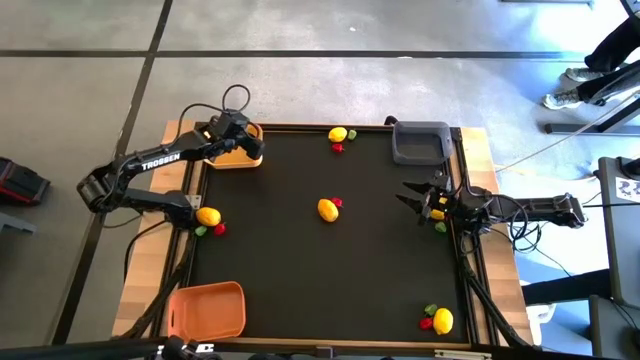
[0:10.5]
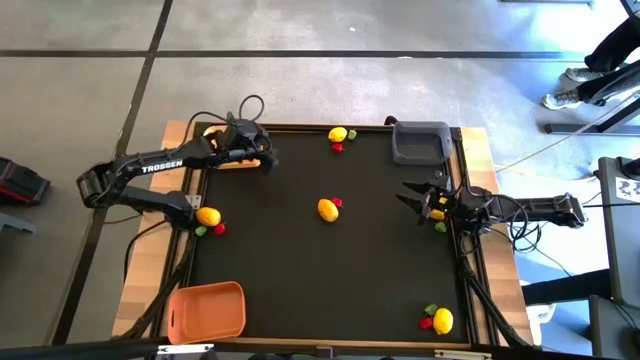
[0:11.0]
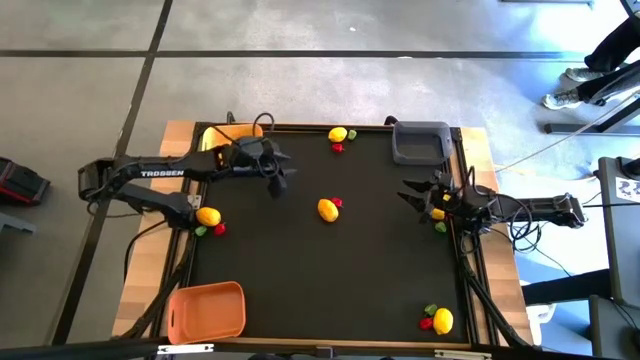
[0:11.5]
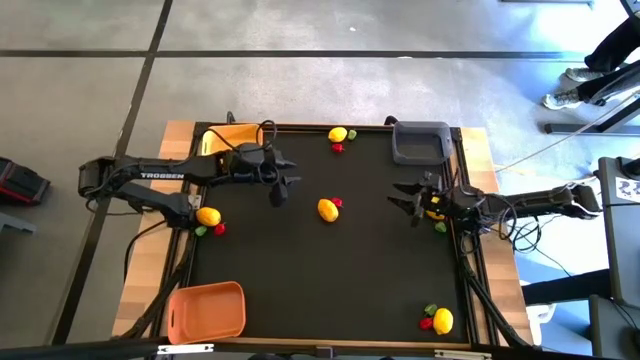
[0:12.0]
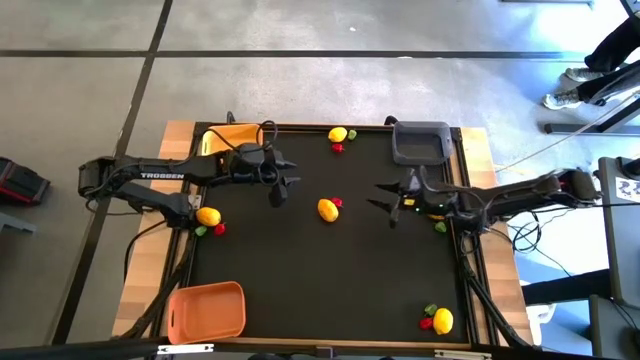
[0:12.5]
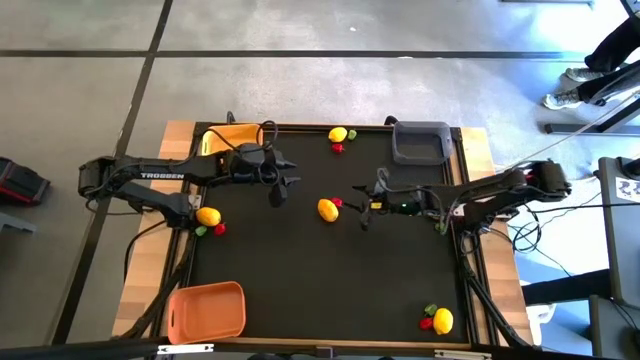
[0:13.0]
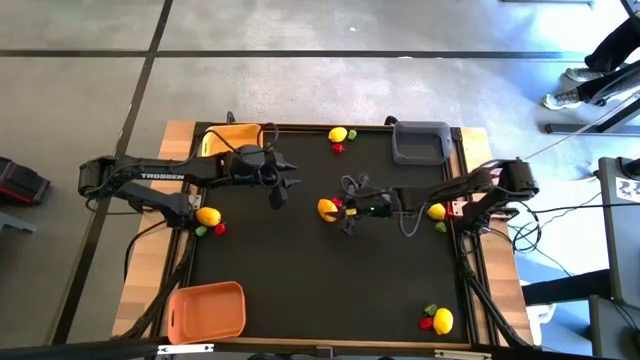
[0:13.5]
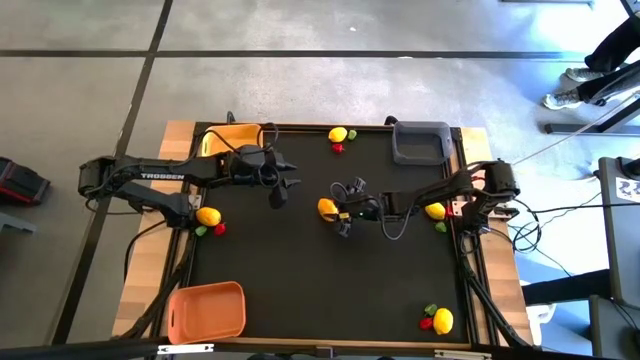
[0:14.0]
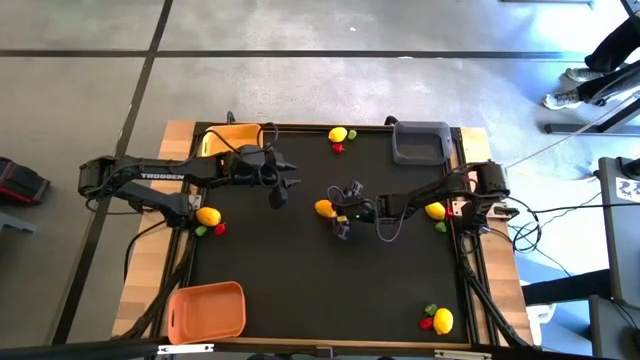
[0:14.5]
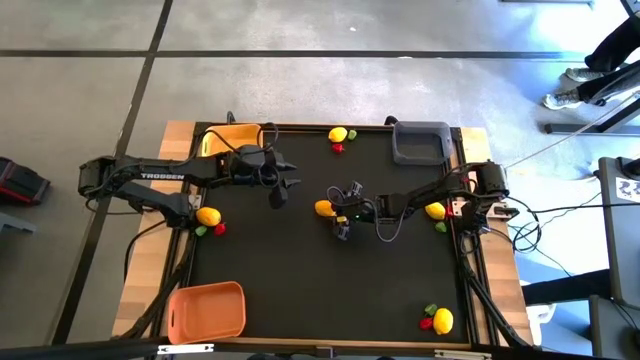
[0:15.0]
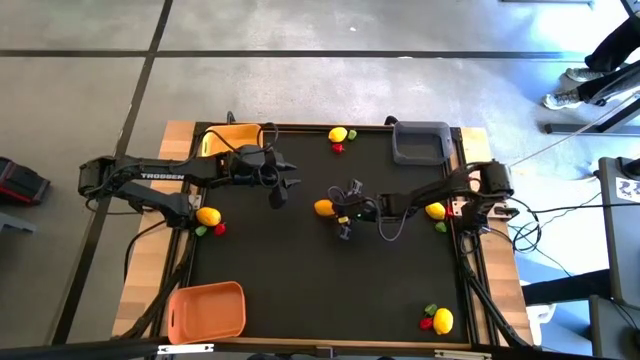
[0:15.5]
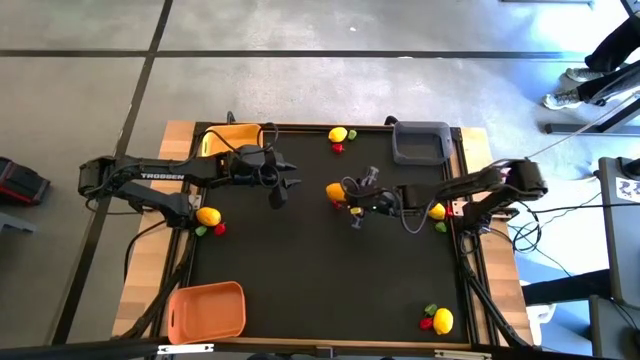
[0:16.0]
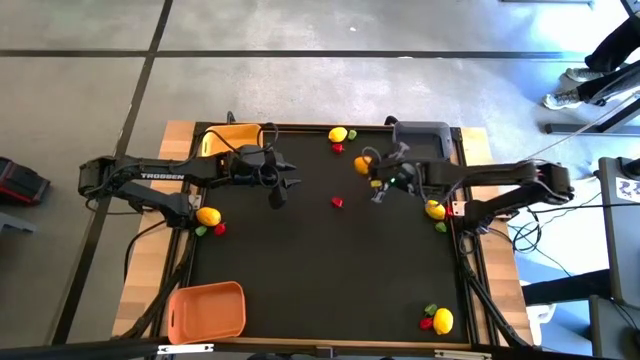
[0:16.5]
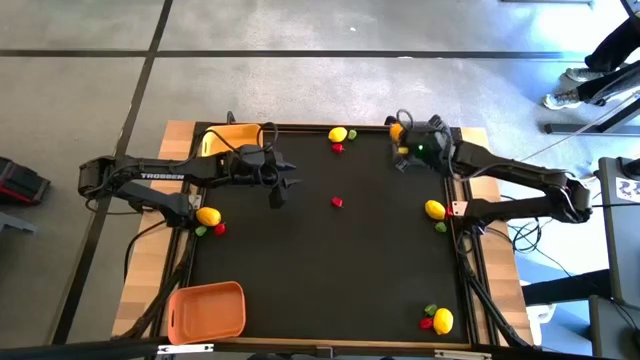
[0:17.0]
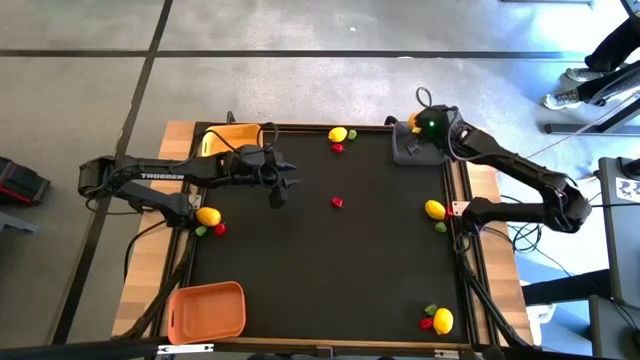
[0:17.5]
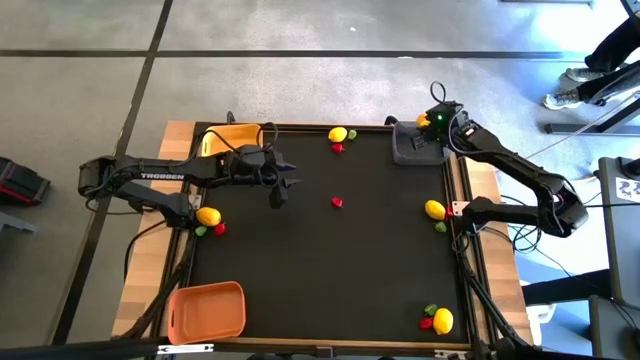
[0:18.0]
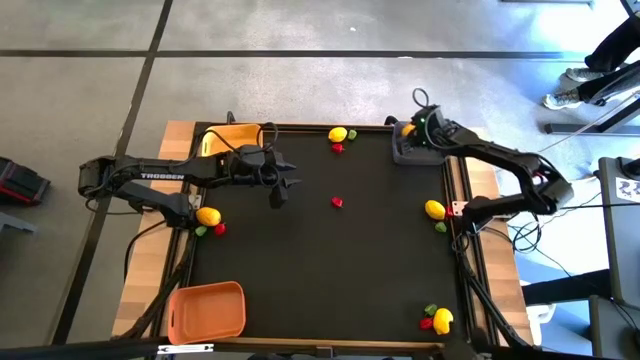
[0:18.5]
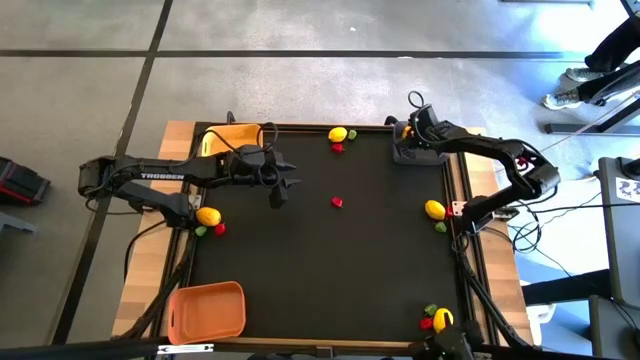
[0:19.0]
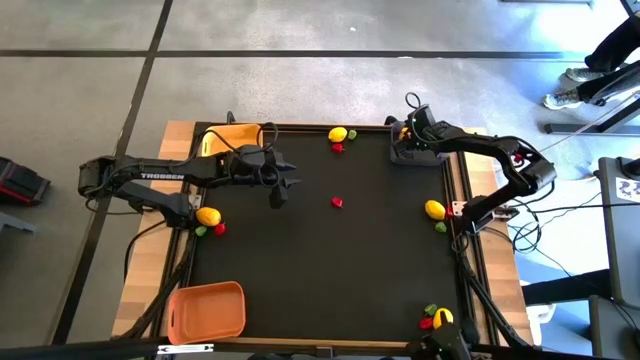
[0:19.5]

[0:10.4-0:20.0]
Task: Sort produce into baskets
Put the yellow lemon into the black bin

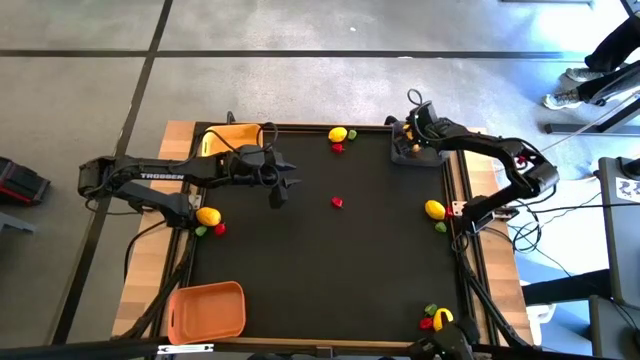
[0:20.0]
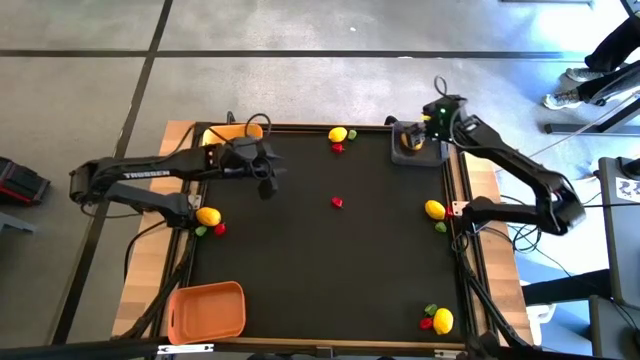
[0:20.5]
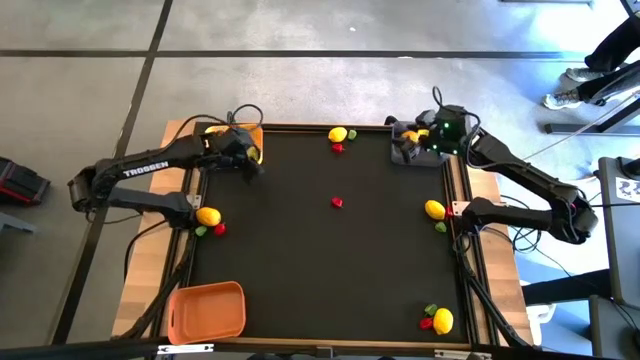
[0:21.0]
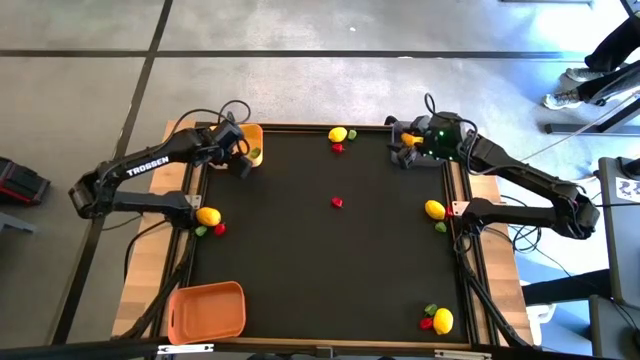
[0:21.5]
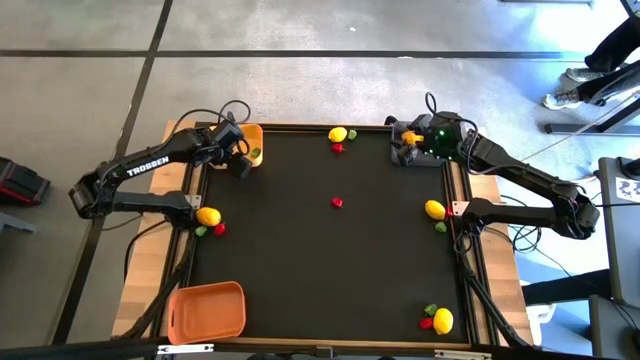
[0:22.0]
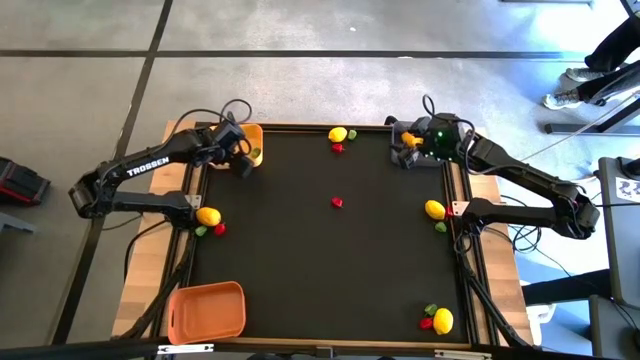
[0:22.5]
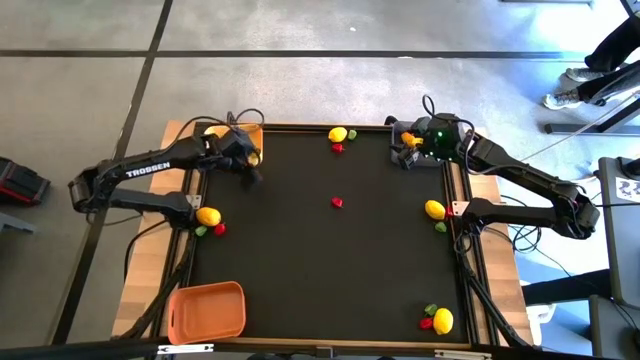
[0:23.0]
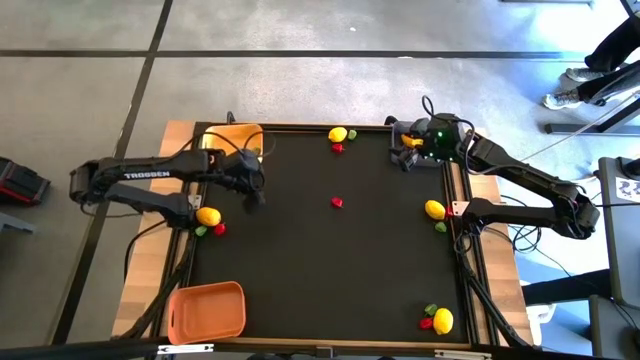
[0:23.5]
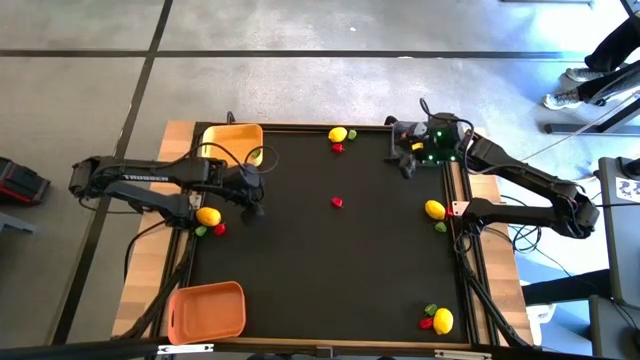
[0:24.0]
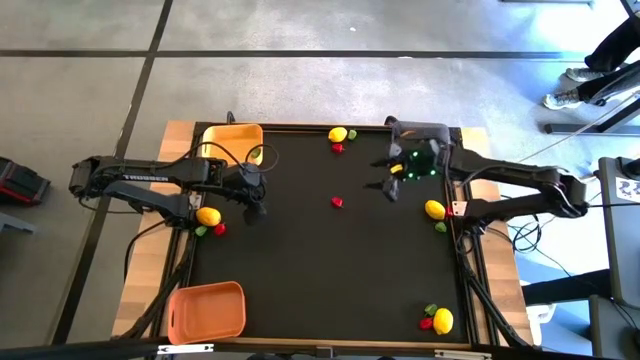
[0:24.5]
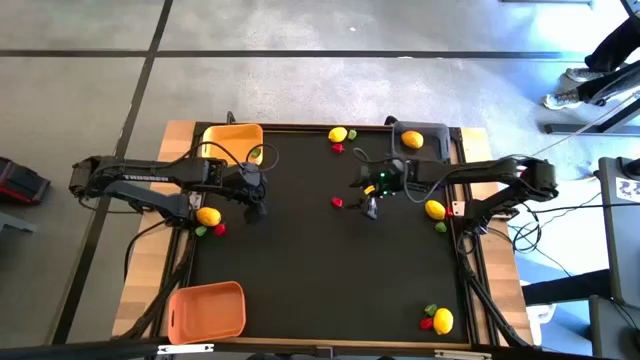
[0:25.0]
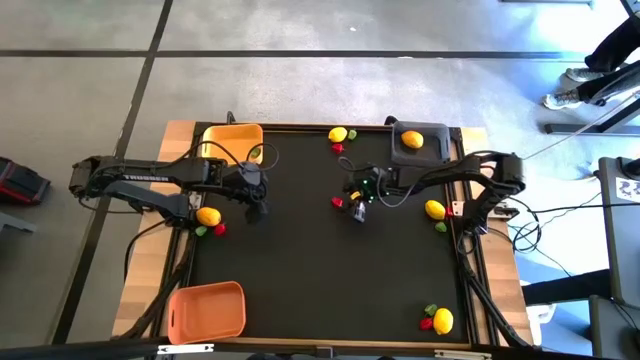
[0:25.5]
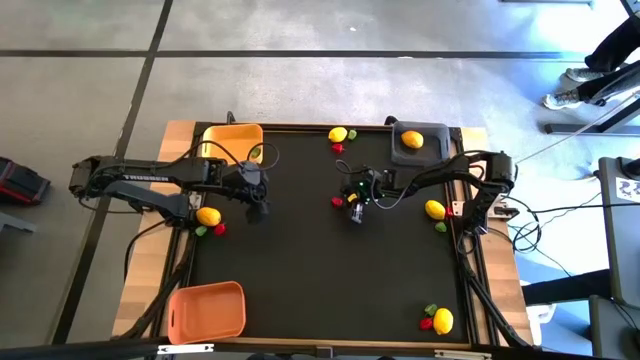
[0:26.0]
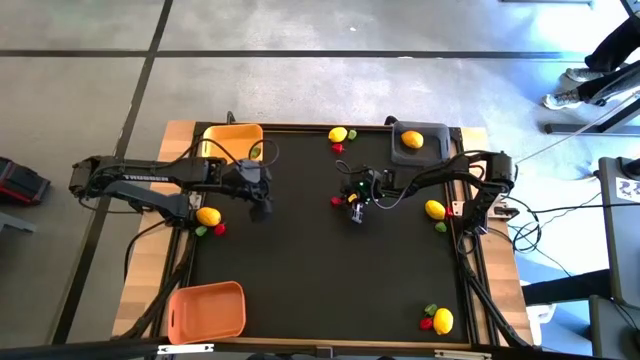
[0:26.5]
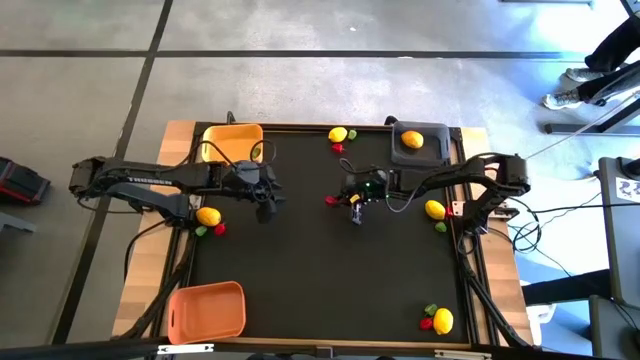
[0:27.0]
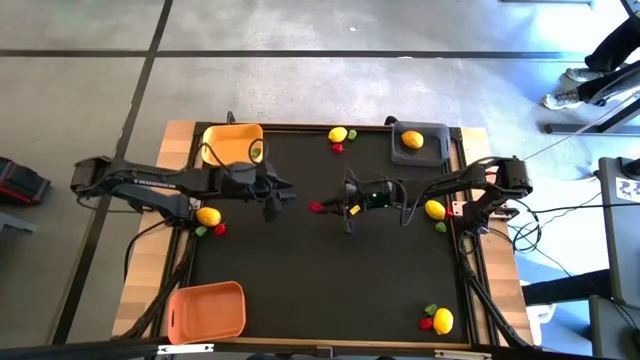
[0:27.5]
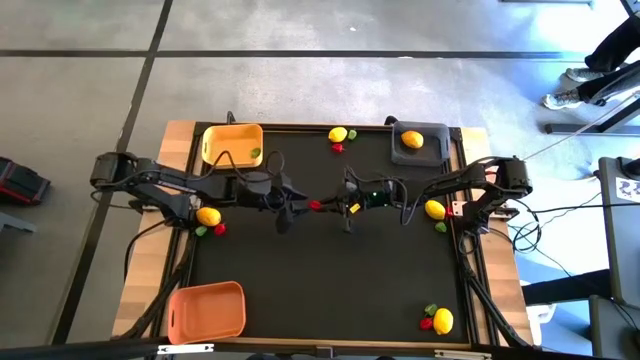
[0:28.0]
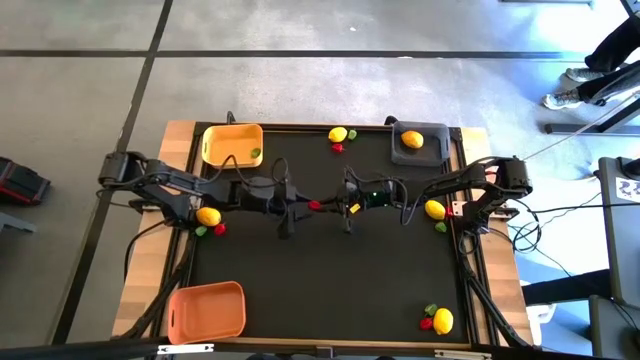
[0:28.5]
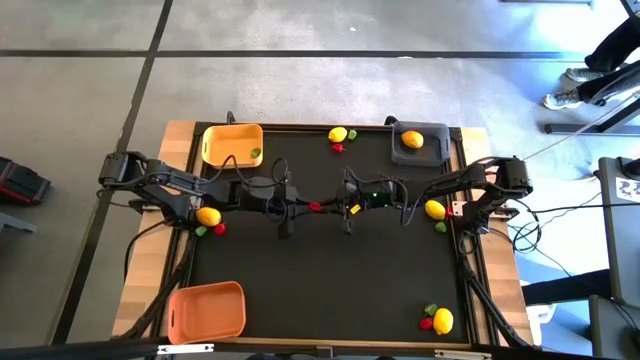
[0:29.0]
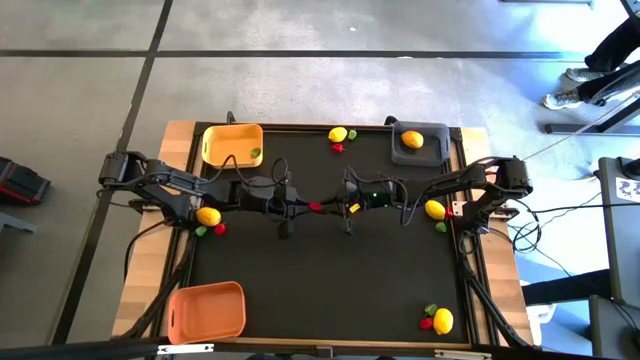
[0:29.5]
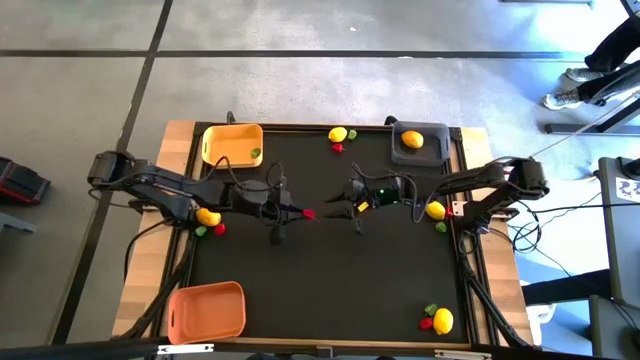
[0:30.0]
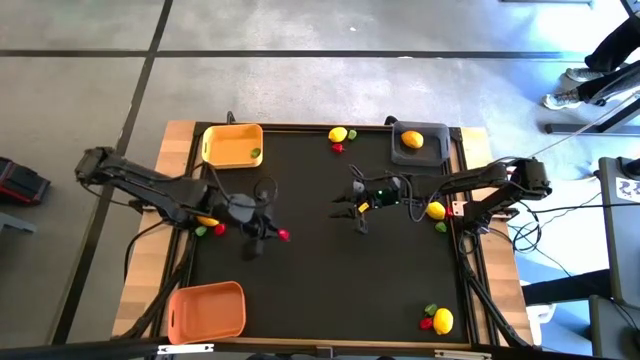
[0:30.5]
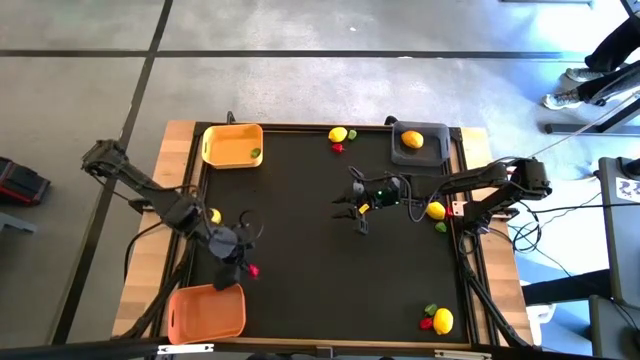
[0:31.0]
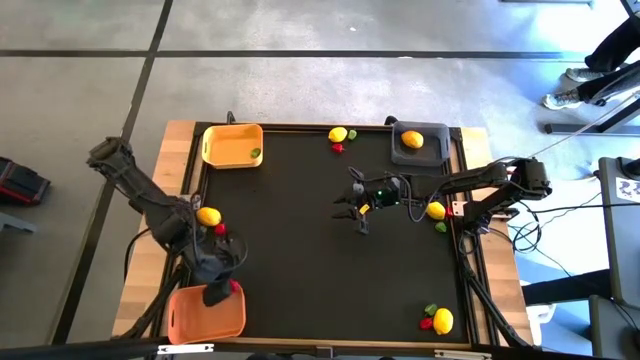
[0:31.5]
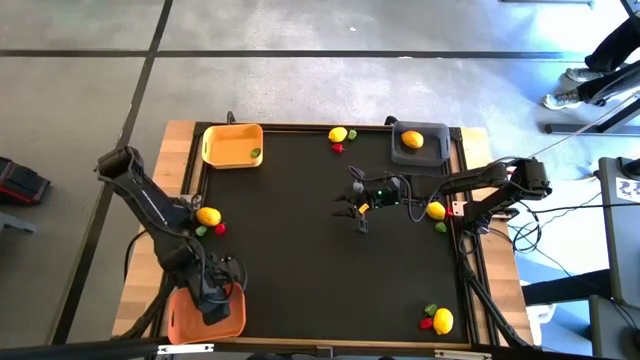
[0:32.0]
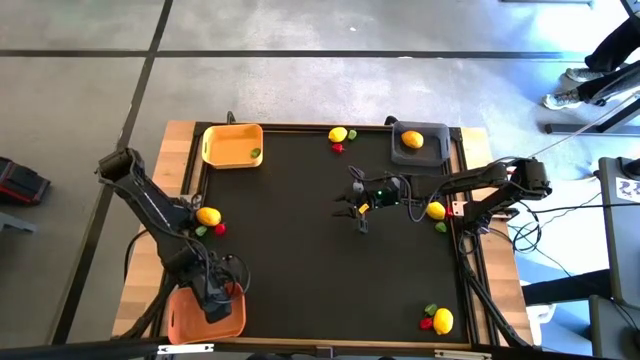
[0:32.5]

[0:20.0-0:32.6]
Put the red bell pepper into the orange bin
